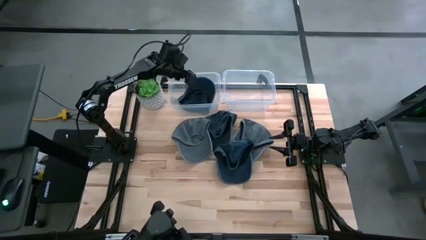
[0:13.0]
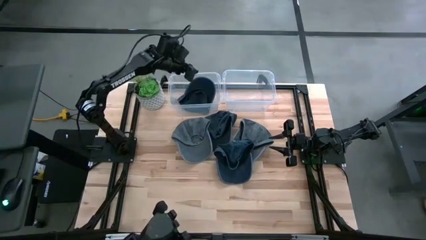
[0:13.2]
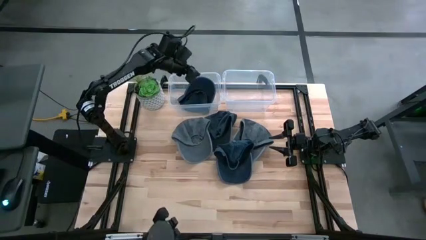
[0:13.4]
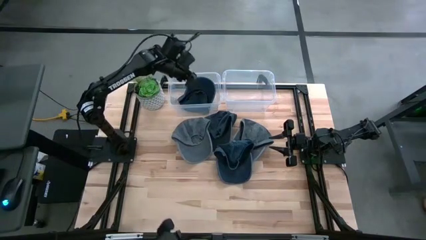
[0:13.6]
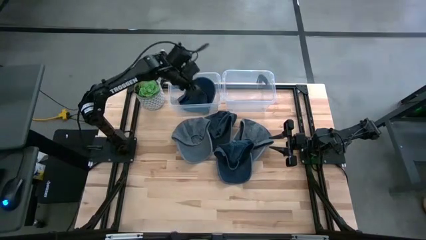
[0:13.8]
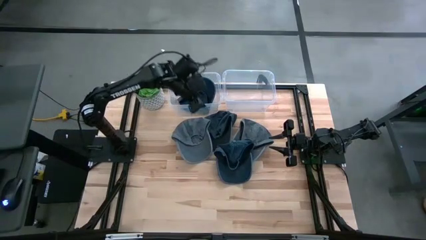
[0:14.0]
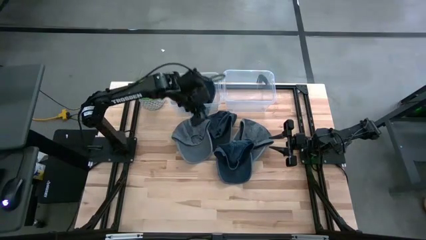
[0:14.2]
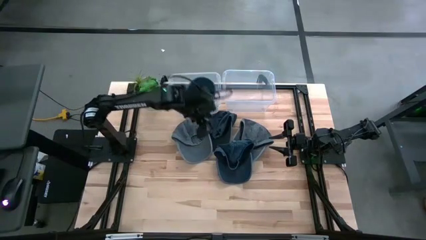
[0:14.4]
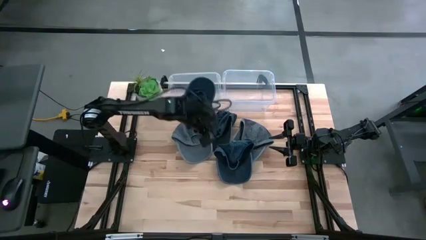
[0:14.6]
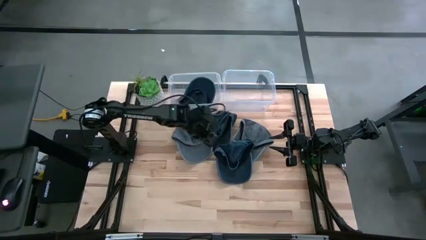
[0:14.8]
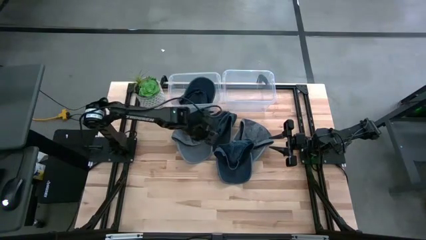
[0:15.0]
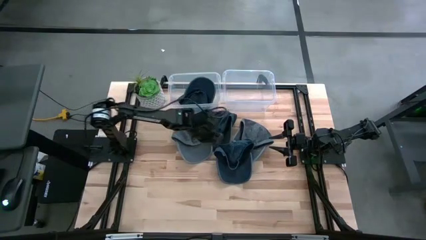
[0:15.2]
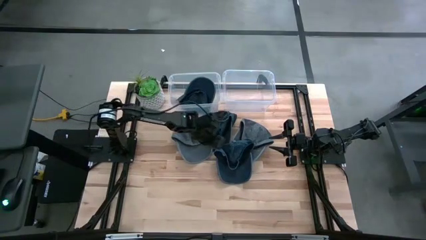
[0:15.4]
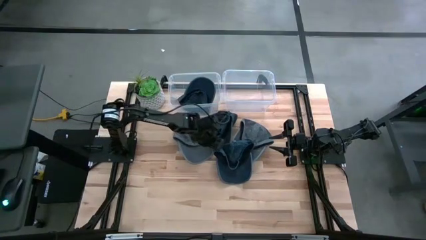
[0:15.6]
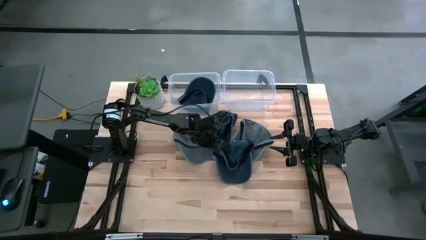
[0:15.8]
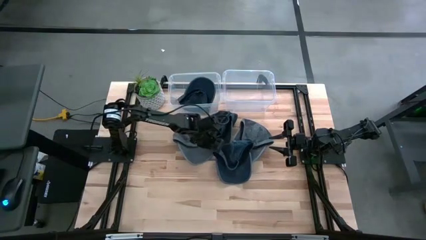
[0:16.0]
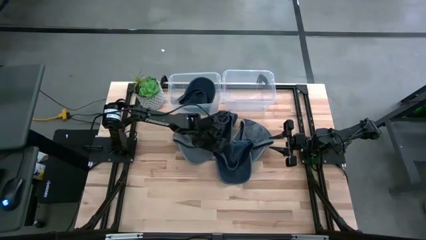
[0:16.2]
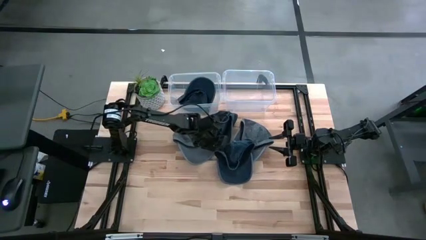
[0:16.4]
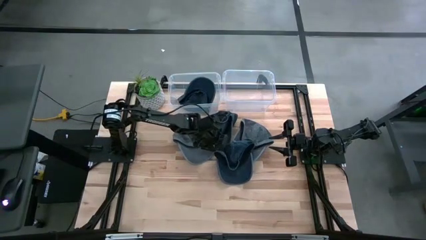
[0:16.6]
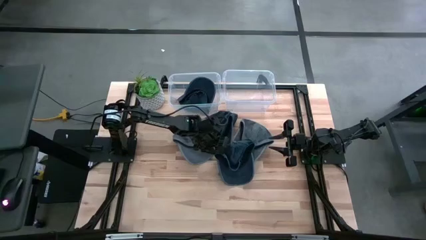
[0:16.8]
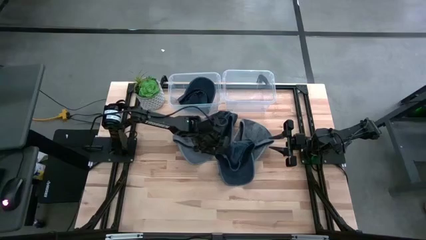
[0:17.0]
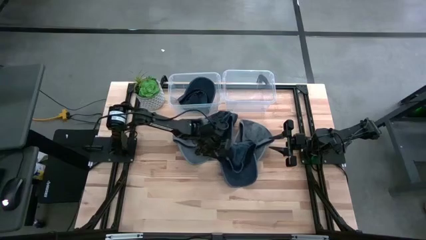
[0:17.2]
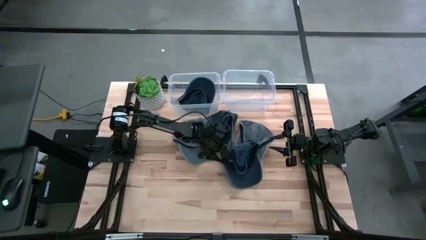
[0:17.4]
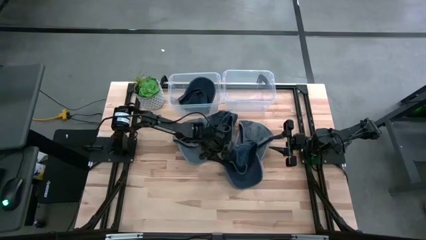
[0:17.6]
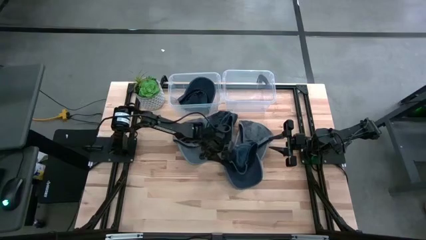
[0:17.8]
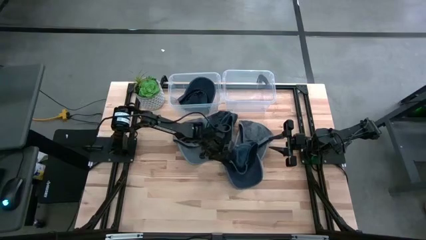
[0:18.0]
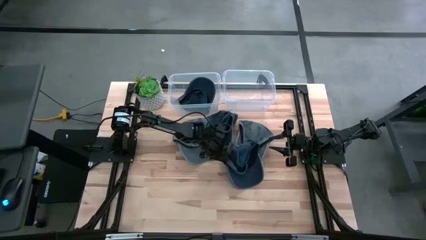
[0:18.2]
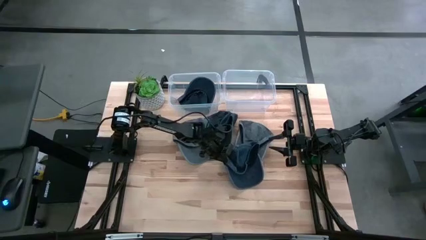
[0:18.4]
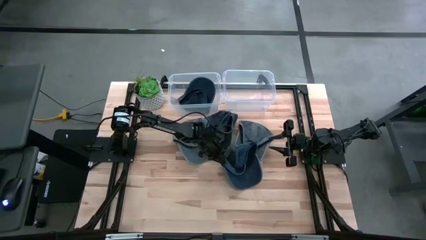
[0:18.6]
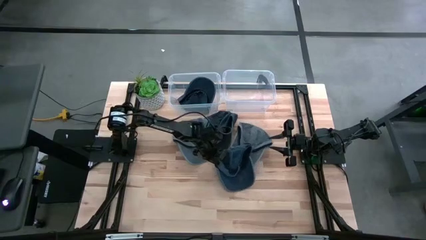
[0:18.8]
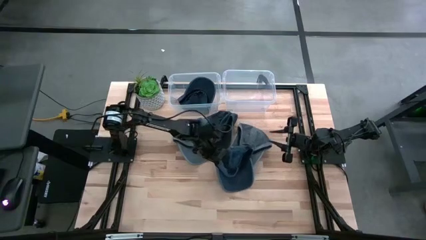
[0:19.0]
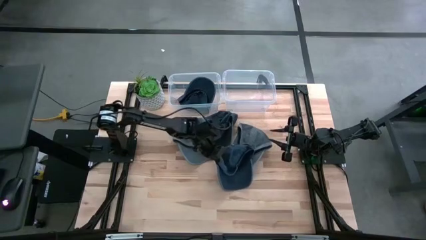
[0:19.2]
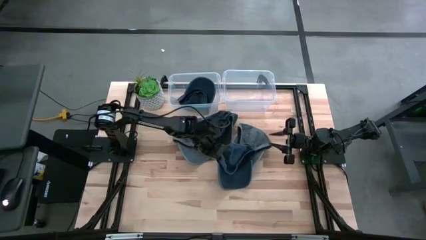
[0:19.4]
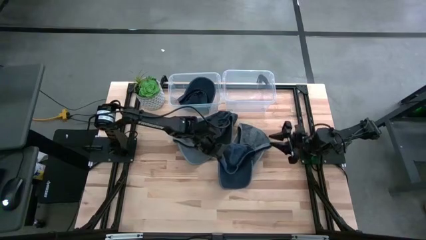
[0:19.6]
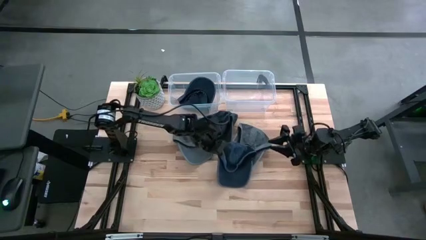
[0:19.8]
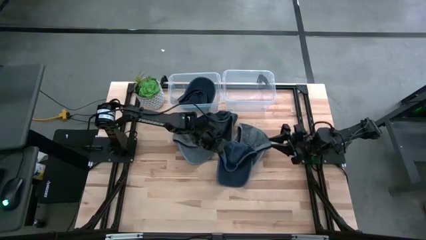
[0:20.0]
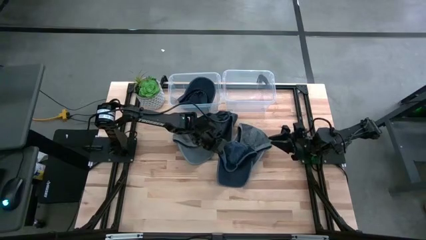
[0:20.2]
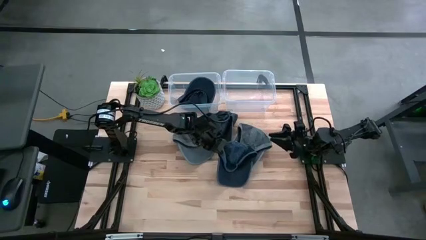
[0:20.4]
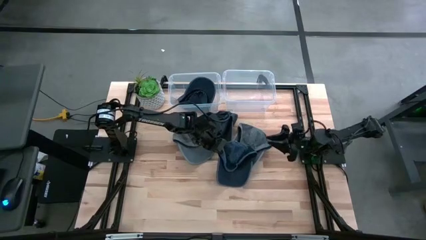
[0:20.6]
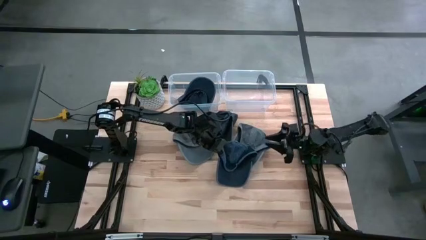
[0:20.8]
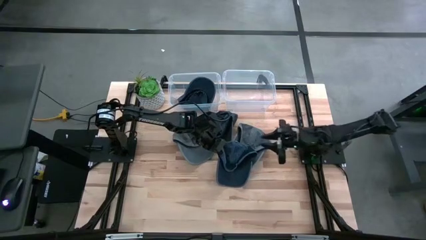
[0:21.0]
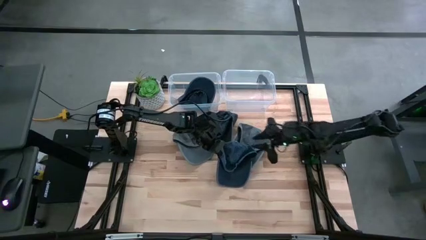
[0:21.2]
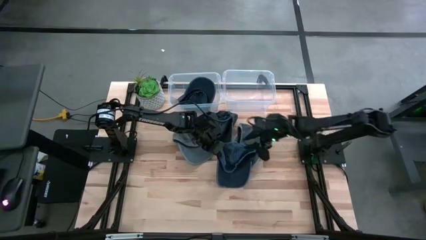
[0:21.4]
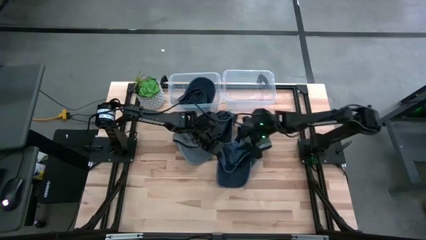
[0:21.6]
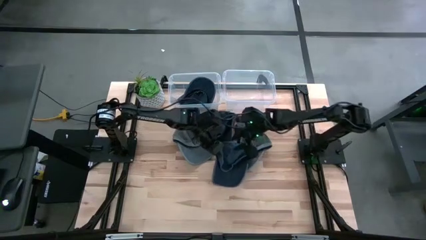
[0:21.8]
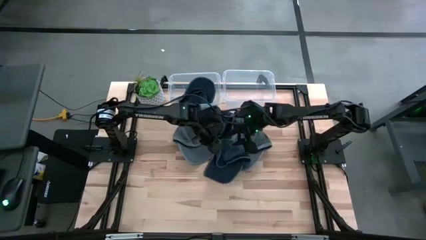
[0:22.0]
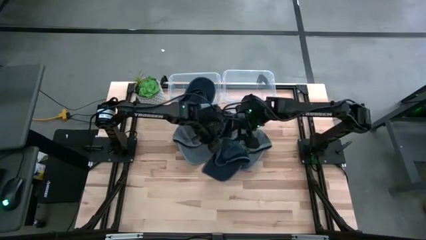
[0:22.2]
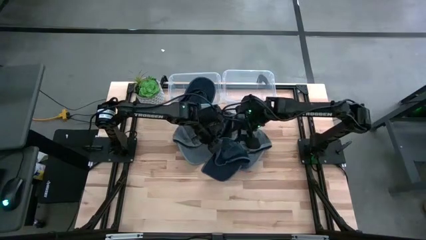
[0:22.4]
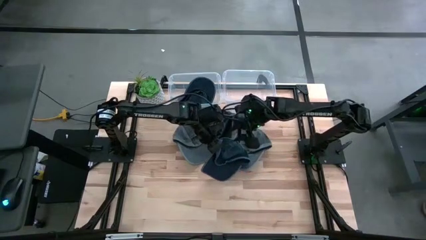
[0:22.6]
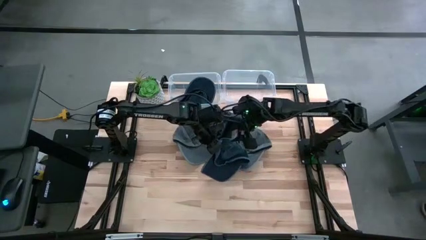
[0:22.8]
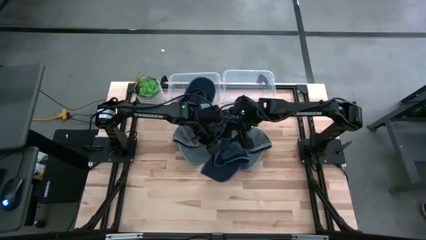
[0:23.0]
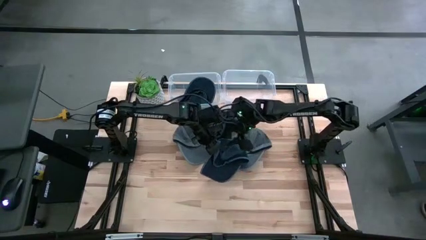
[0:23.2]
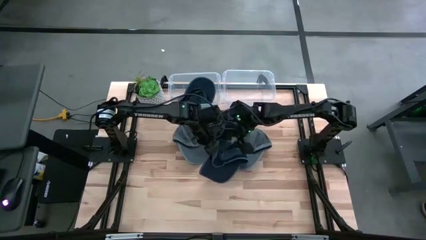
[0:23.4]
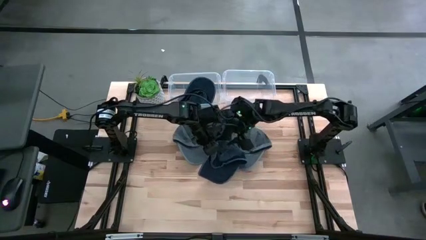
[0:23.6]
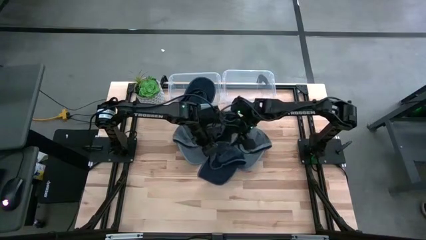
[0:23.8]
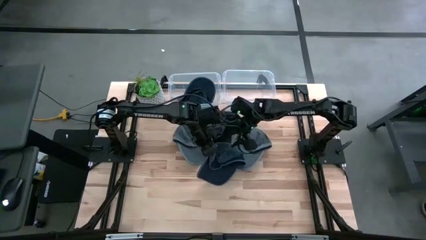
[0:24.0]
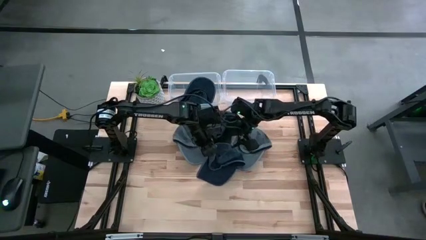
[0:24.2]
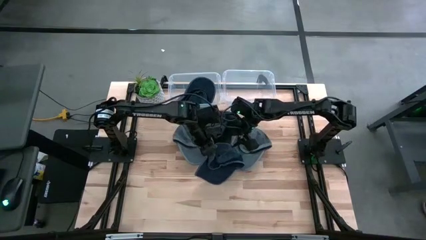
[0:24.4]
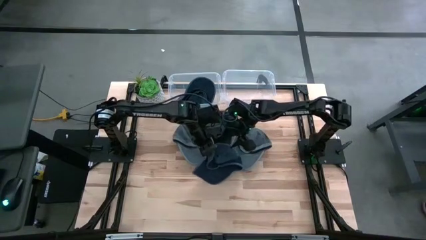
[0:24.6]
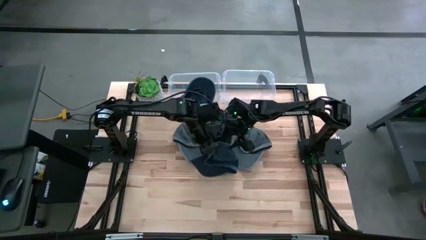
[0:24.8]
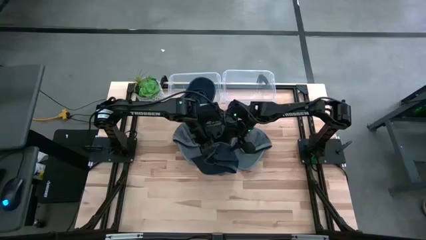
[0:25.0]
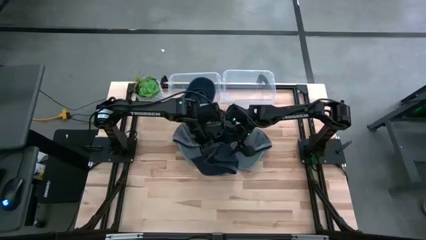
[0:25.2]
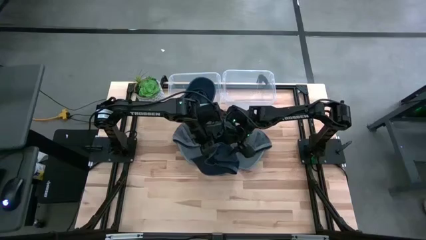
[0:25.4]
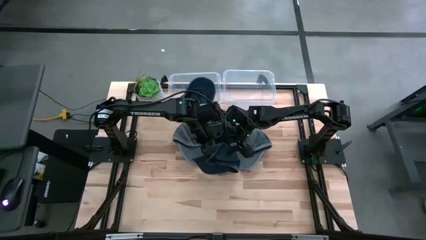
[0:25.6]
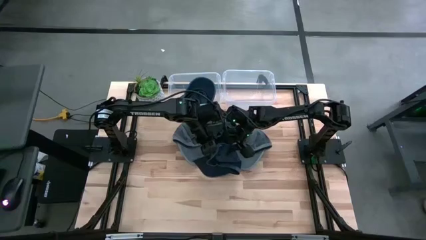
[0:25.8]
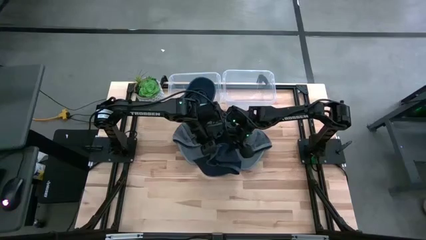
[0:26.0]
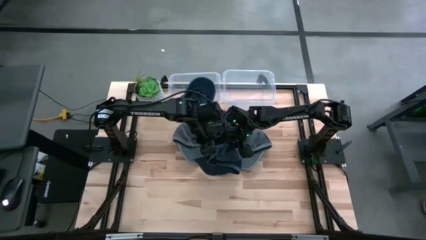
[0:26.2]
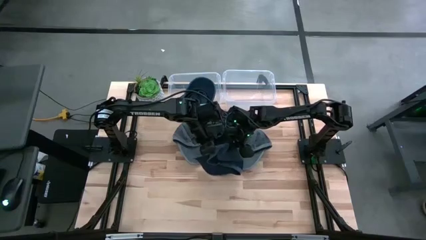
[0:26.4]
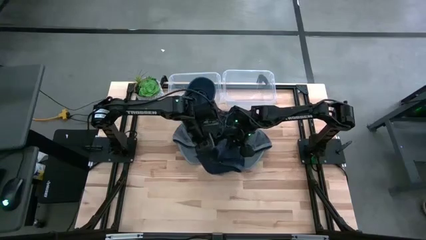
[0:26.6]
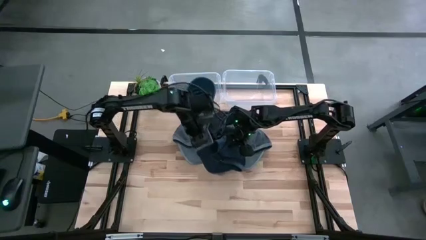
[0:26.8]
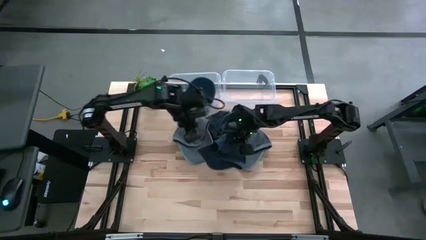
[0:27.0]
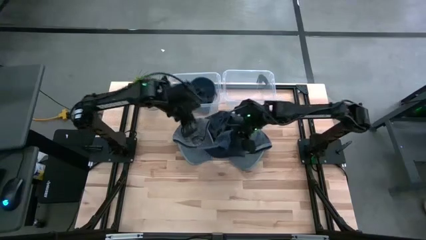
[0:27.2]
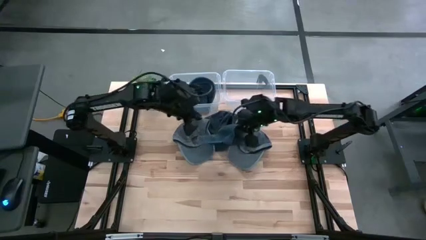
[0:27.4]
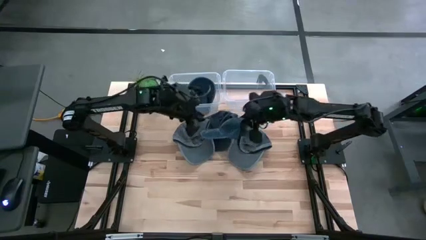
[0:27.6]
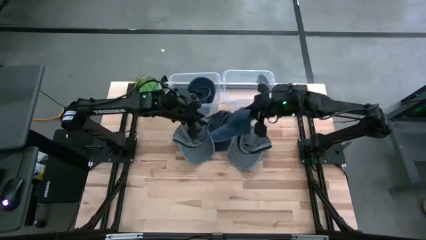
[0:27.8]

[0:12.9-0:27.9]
Task: Pick & Place hat
Put the bottom dark blue cap into the left transparent bin
